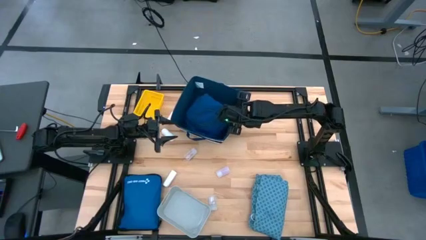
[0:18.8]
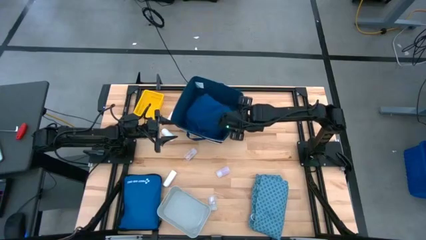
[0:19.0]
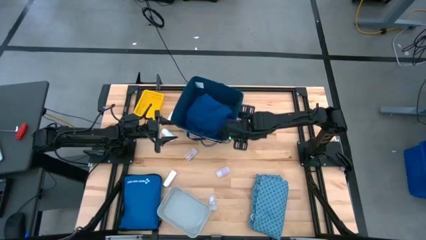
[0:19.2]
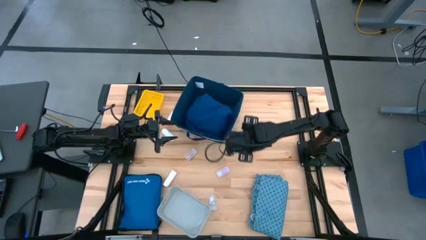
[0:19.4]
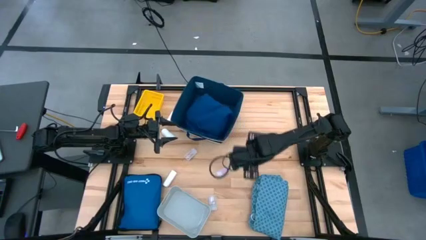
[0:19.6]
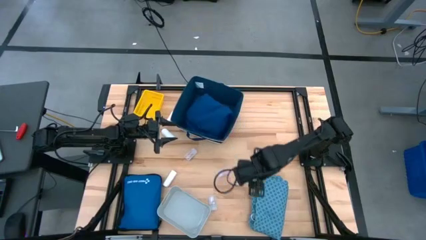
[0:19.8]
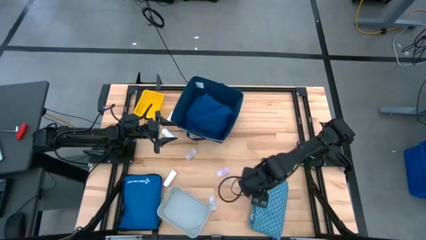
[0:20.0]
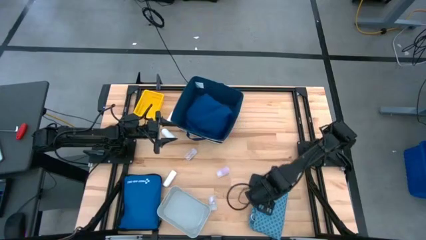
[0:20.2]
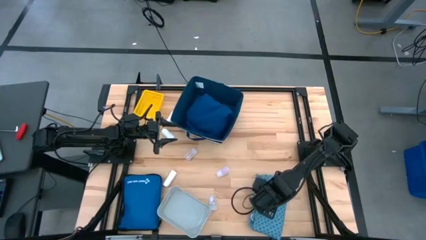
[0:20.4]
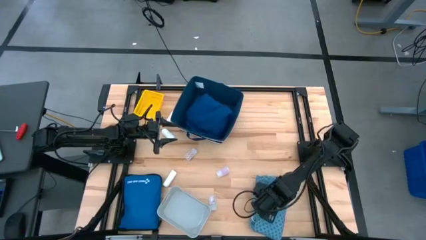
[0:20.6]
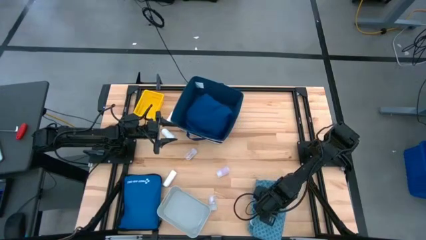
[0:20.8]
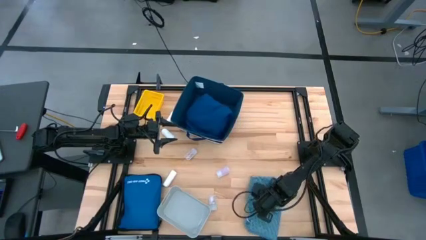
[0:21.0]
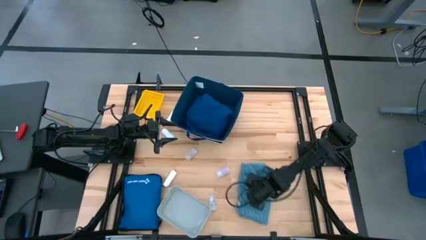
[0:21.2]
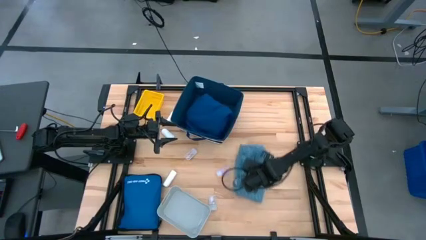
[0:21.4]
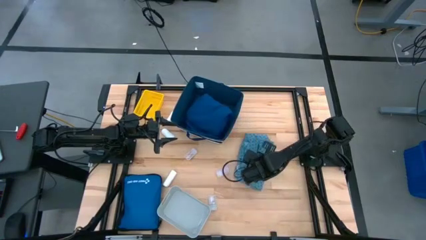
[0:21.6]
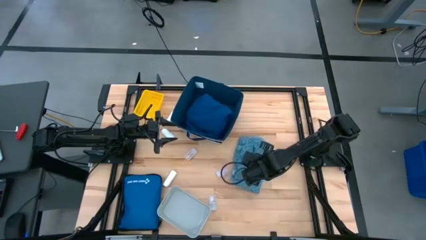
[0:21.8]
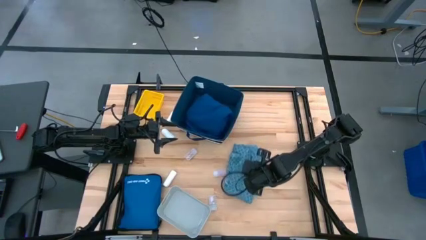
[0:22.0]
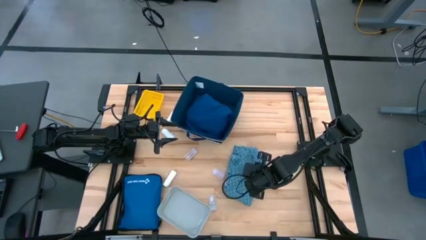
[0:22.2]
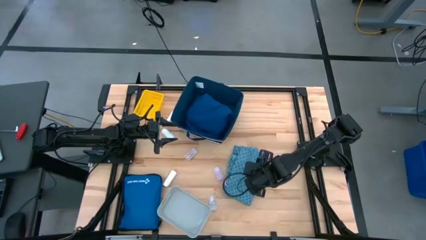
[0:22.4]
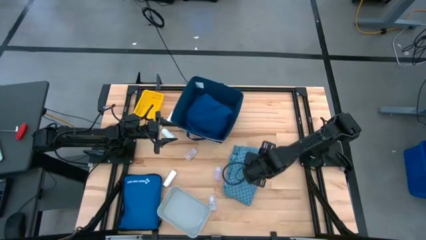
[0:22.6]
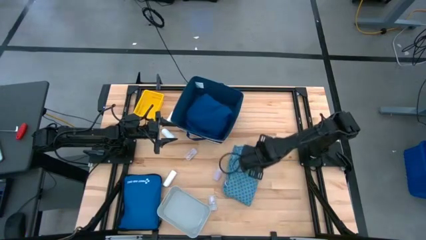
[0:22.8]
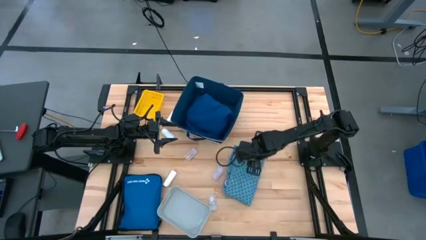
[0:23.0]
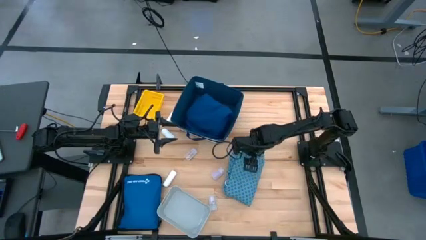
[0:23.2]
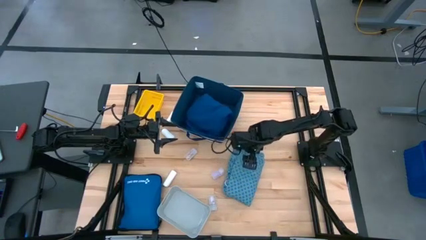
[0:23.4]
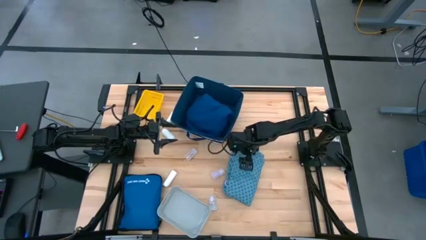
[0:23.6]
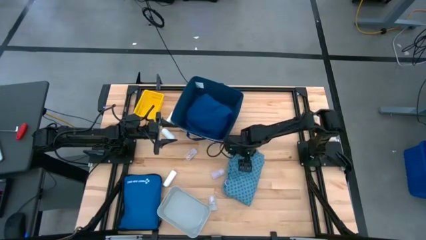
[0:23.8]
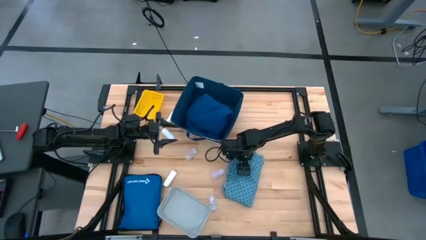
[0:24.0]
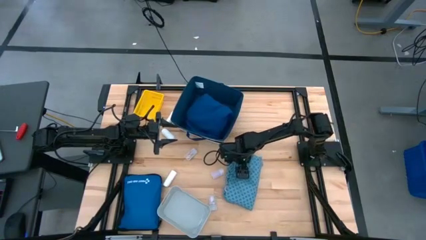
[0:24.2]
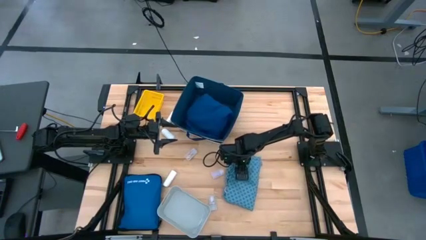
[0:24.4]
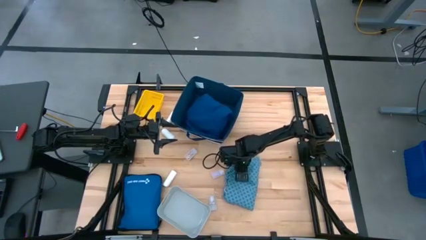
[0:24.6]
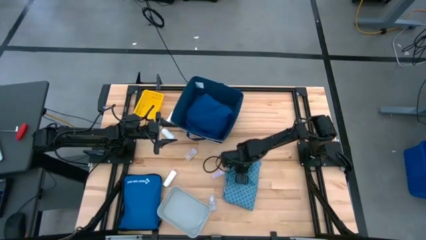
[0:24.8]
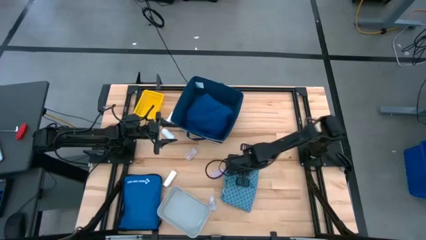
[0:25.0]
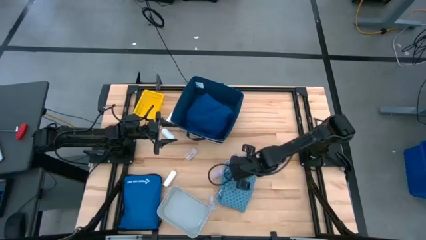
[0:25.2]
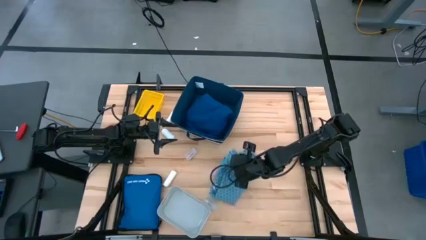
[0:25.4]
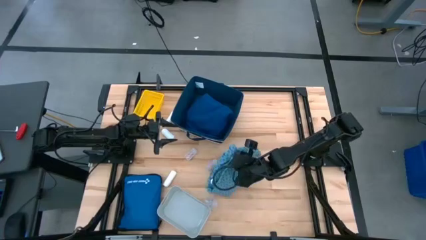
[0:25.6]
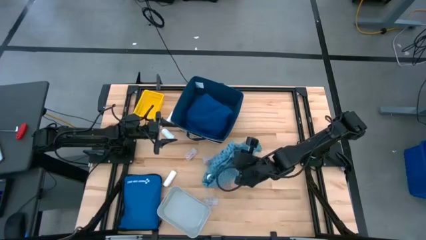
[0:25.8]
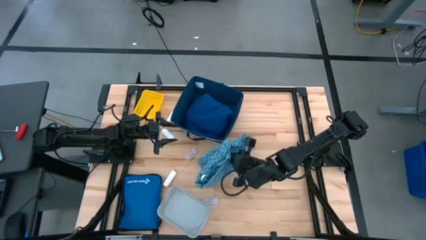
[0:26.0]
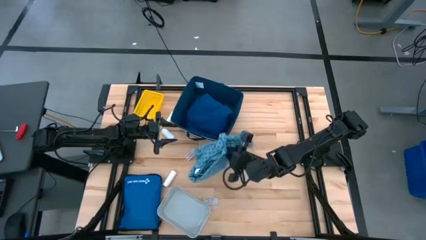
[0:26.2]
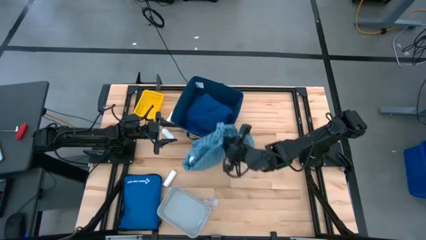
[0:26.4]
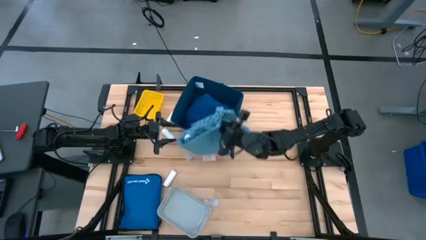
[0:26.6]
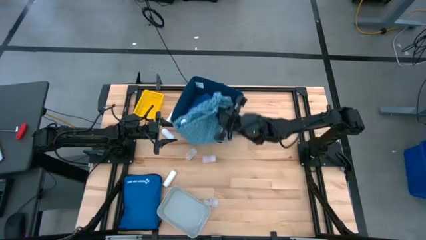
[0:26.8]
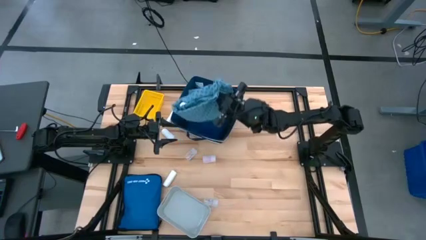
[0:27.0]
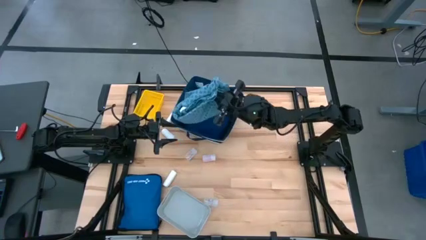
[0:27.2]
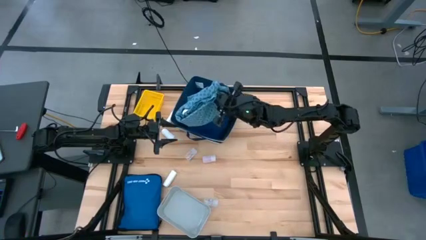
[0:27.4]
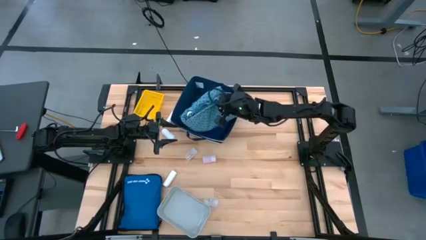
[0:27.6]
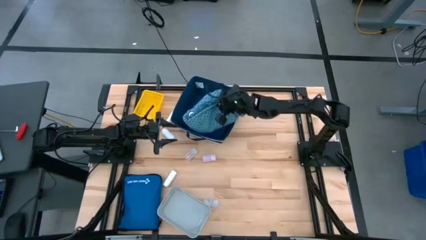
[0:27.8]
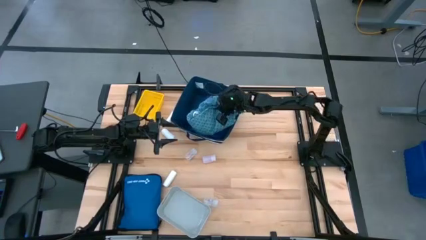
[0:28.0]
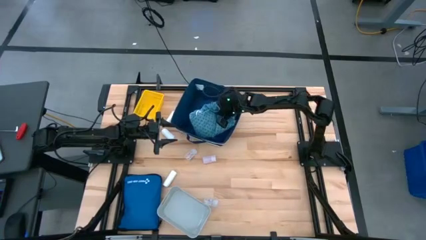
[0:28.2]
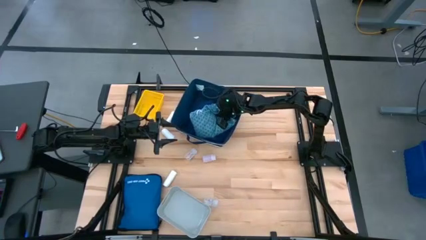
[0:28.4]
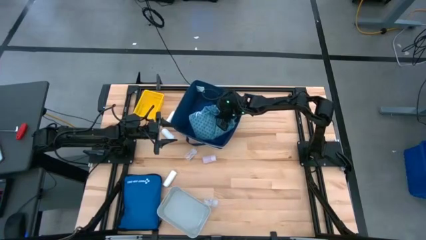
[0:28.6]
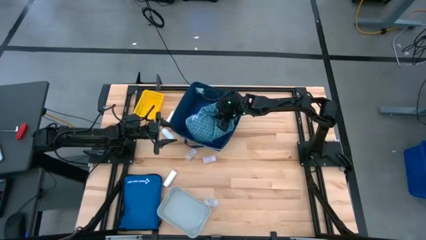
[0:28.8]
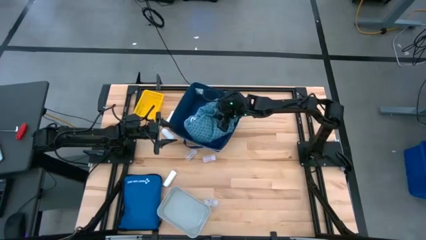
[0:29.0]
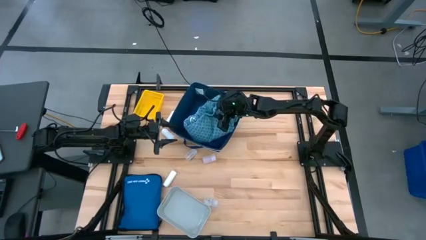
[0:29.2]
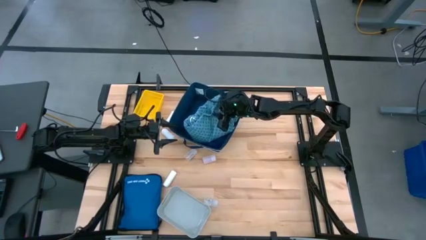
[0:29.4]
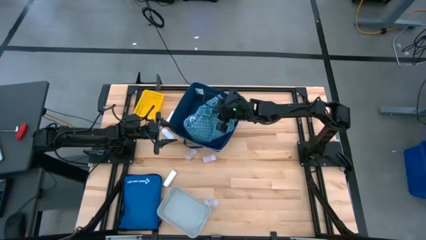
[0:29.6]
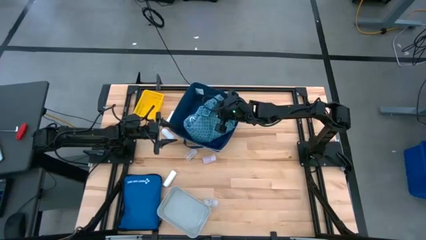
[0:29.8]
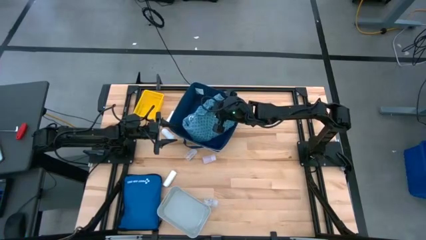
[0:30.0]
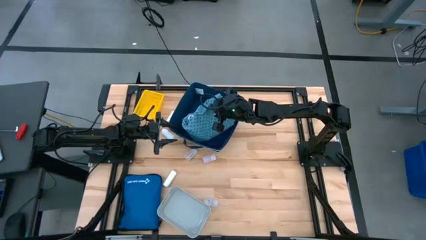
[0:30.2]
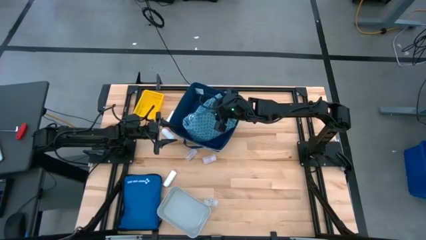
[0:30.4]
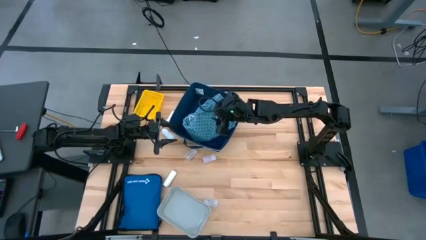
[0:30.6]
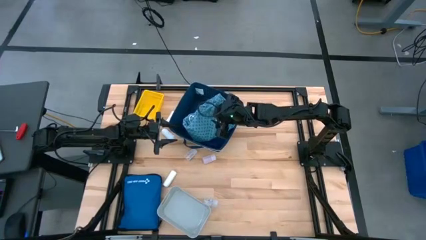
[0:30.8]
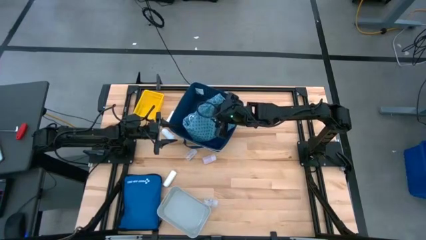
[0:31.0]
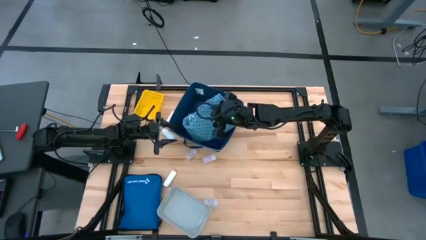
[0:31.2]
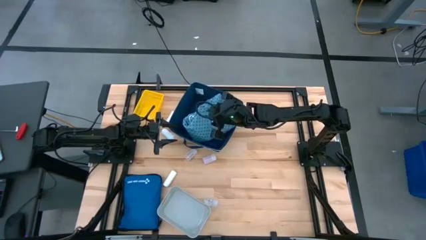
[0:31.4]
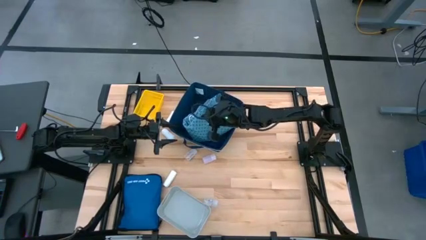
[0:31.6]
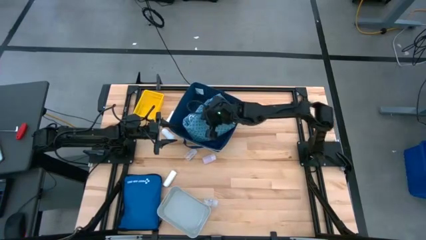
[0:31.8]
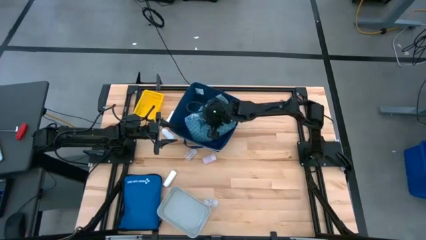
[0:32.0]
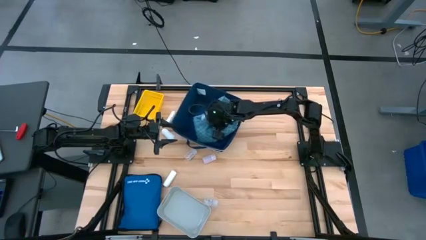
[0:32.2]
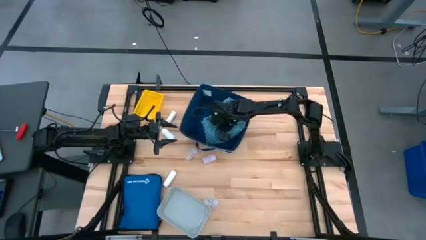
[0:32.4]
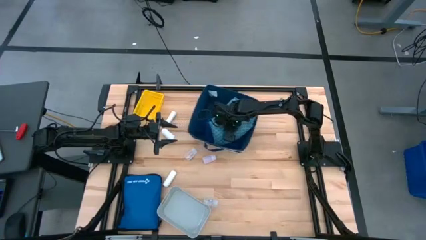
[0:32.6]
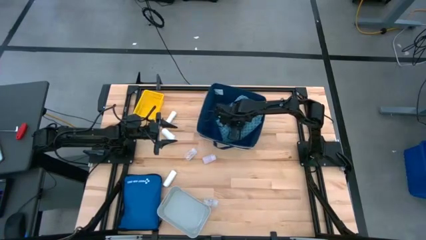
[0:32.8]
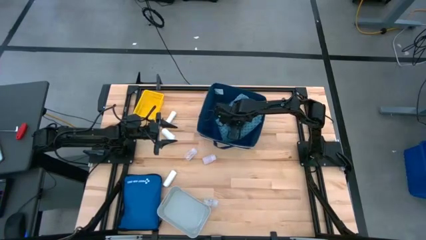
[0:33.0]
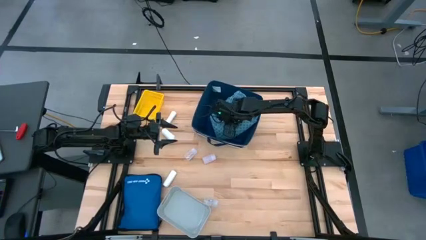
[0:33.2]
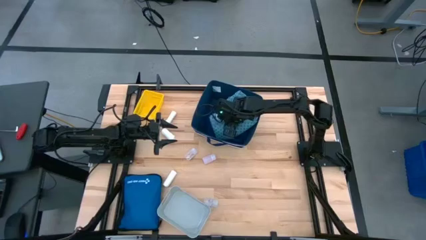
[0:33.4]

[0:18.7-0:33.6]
Task: Pick & place medical supplies in basket/bin
Put the blue patient gown into the blue laundry bin

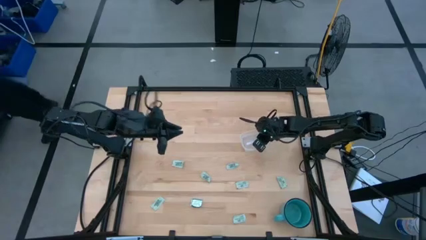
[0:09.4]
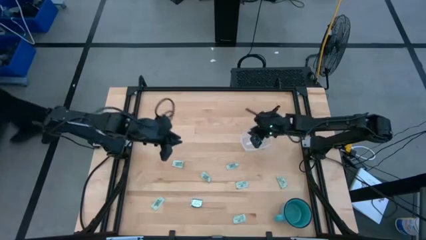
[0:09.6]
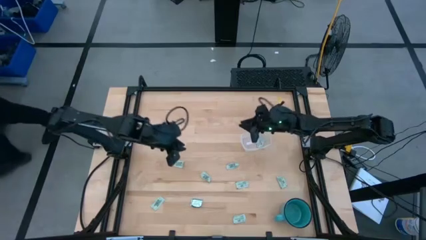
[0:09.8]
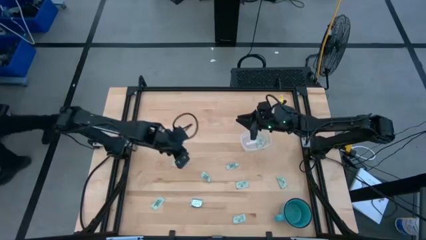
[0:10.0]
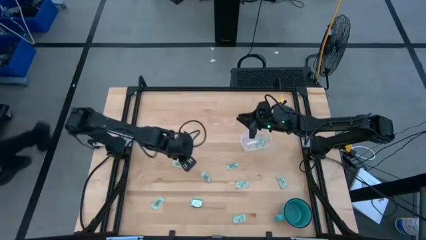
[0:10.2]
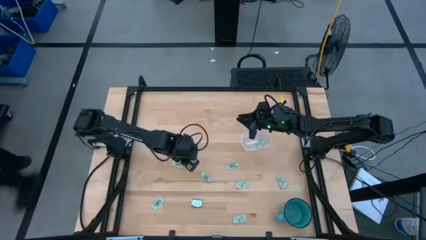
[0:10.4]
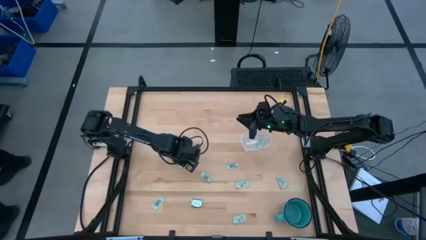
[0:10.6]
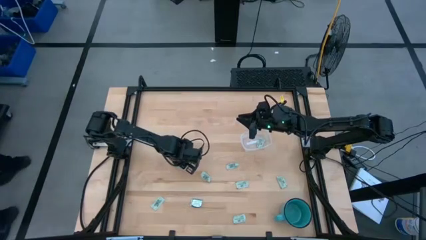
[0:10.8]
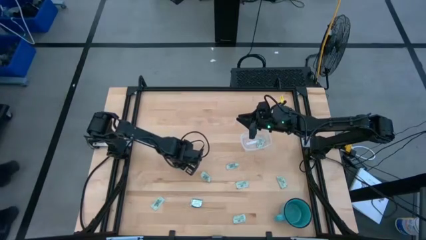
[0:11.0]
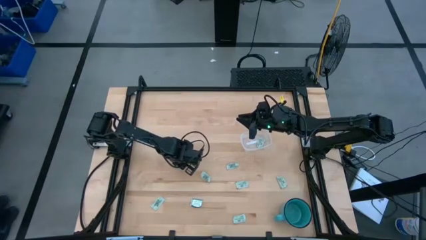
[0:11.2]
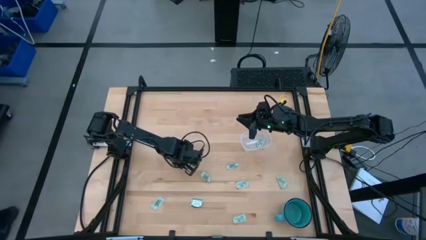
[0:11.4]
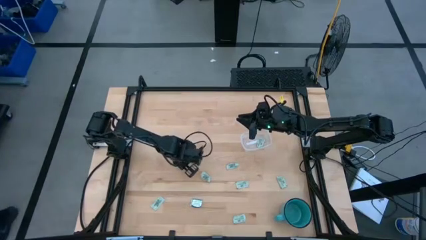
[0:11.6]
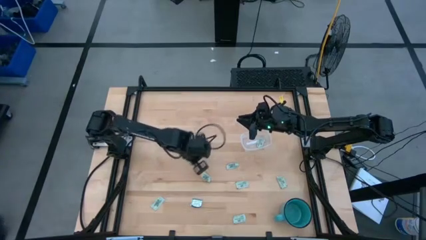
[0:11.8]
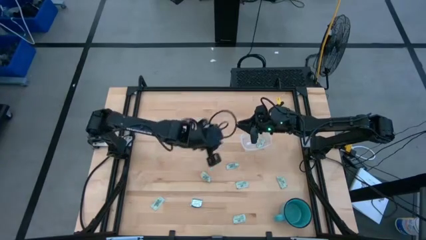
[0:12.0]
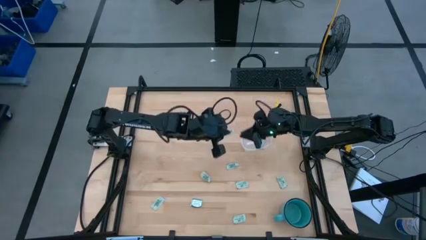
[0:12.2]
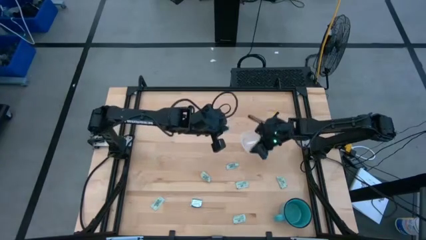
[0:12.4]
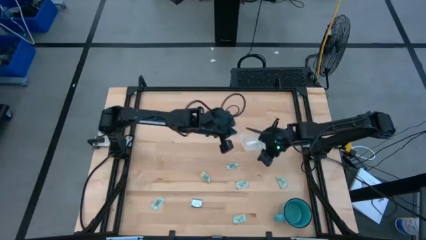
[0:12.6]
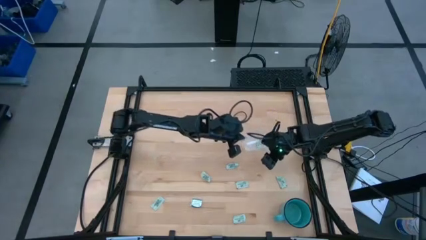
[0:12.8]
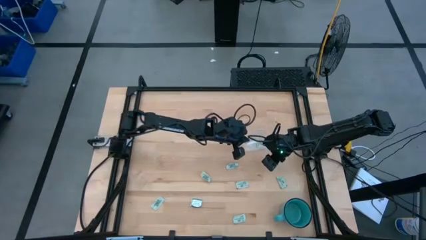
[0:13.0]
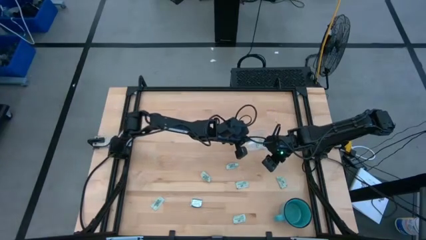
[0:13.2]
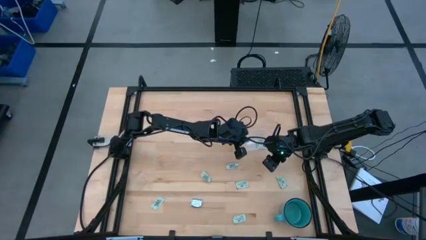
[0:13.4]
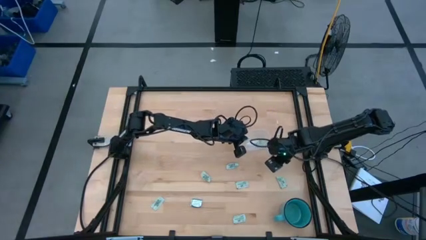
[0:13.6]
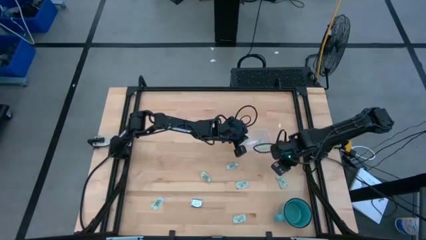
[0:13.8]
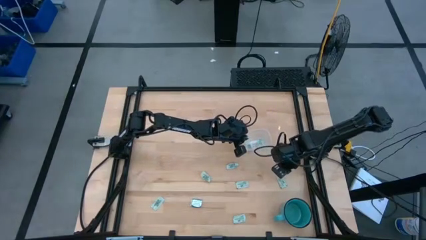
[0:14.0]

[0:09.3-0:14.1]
Task: Pick and place Stevia / Truvia into bins
Put the green stevia packet into the transparent bin
